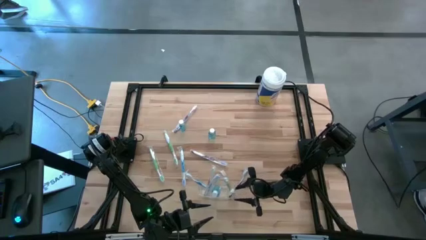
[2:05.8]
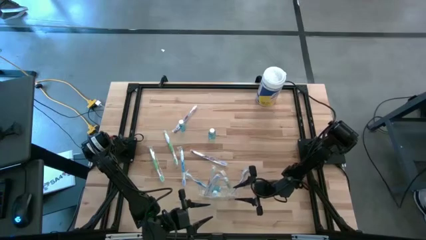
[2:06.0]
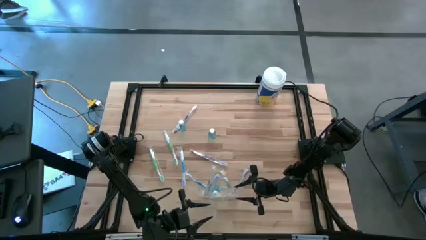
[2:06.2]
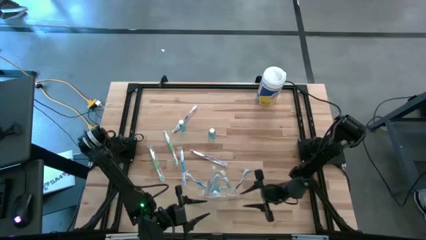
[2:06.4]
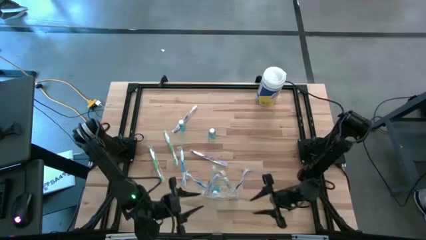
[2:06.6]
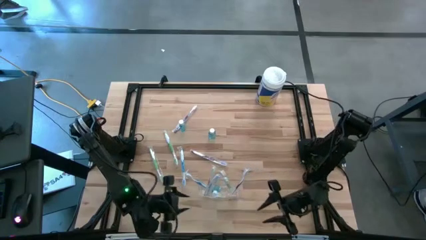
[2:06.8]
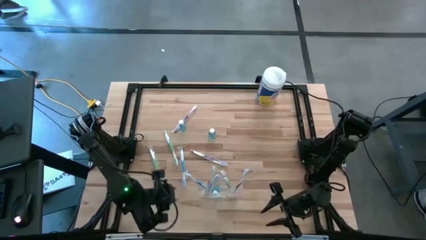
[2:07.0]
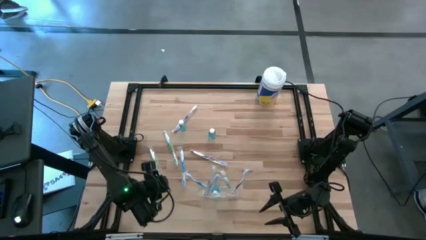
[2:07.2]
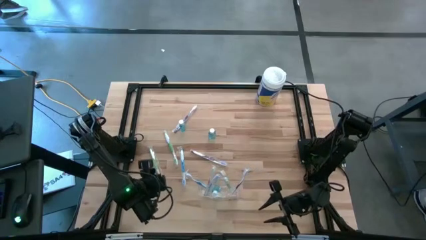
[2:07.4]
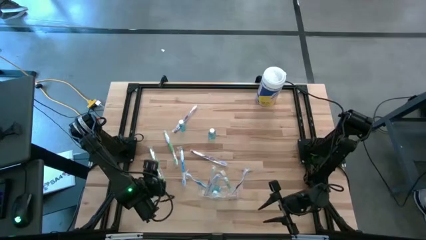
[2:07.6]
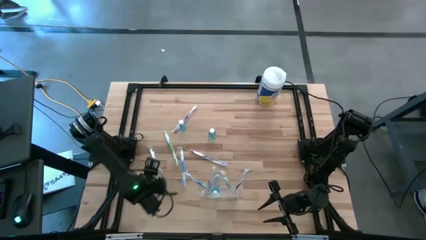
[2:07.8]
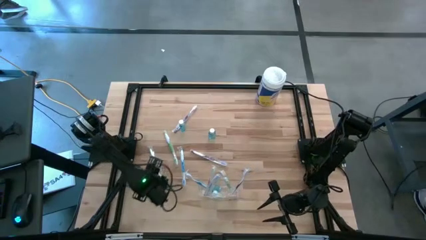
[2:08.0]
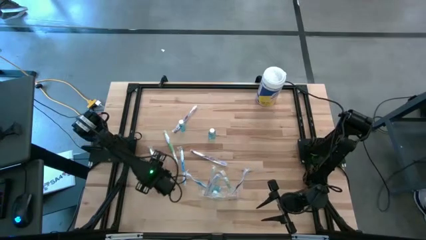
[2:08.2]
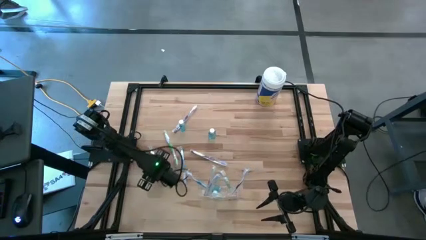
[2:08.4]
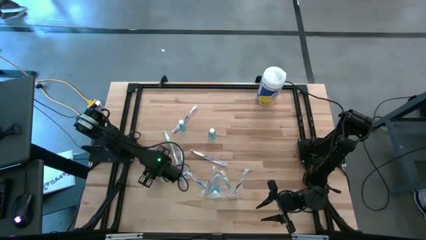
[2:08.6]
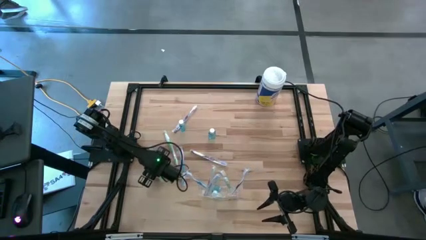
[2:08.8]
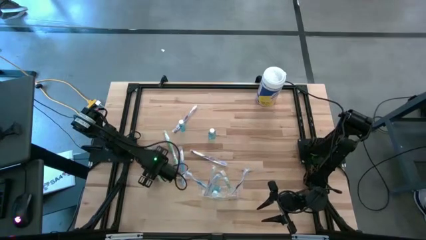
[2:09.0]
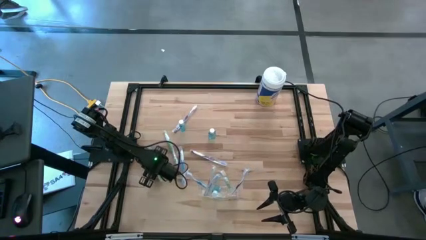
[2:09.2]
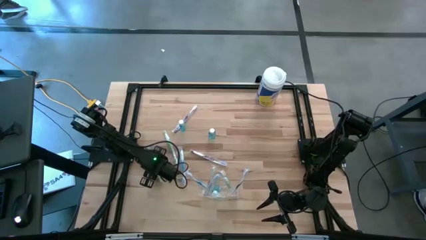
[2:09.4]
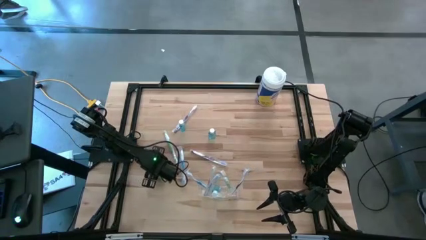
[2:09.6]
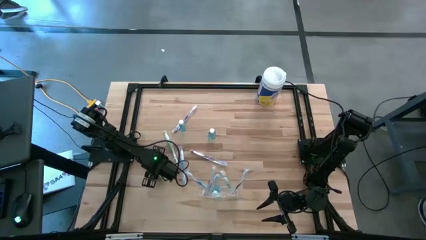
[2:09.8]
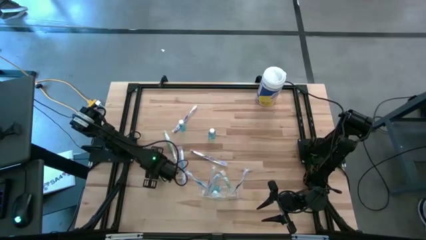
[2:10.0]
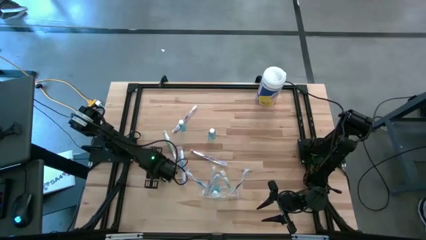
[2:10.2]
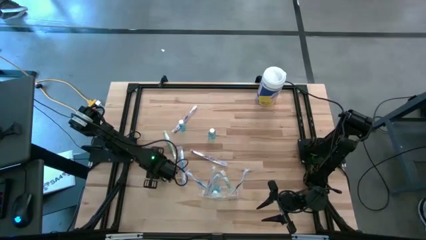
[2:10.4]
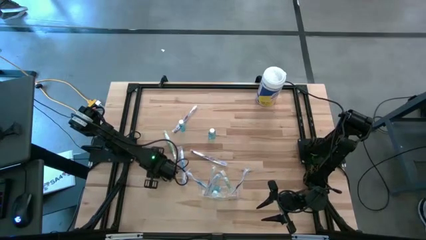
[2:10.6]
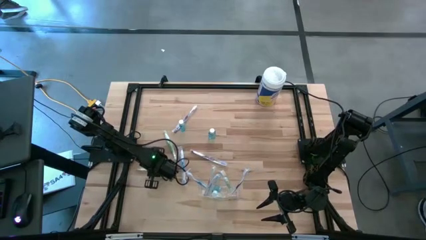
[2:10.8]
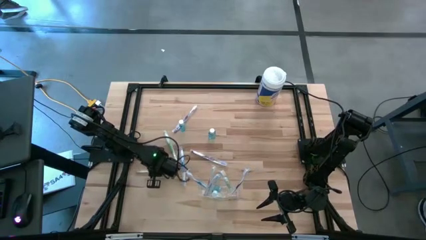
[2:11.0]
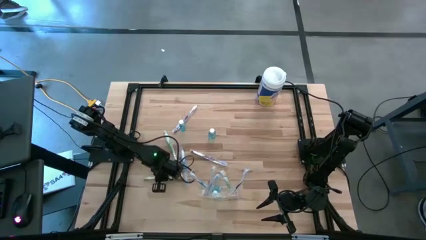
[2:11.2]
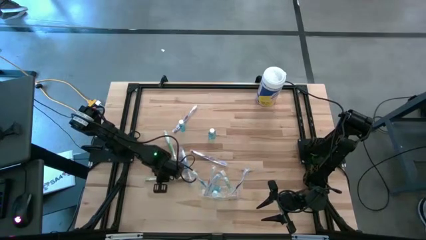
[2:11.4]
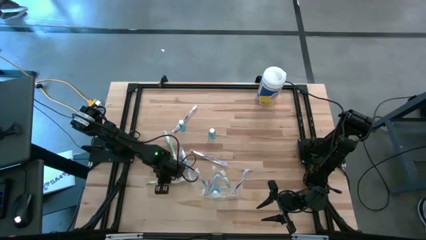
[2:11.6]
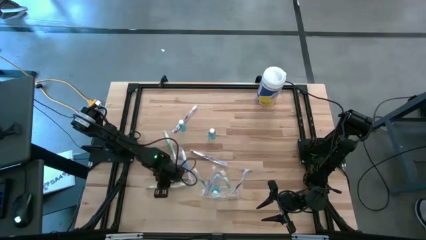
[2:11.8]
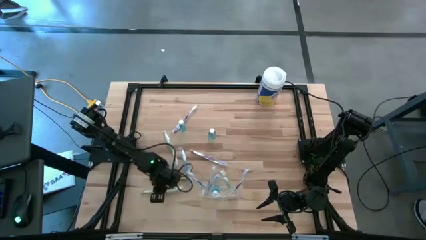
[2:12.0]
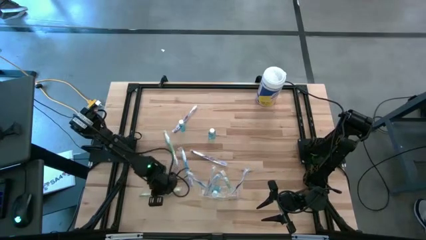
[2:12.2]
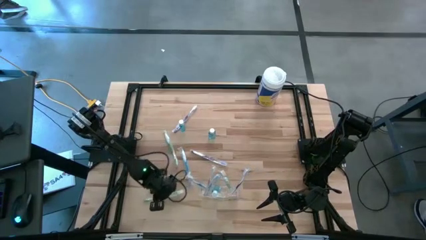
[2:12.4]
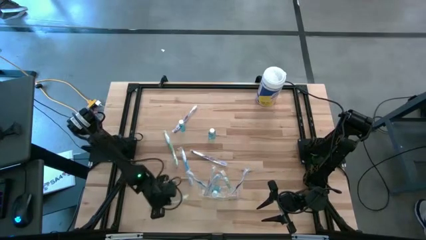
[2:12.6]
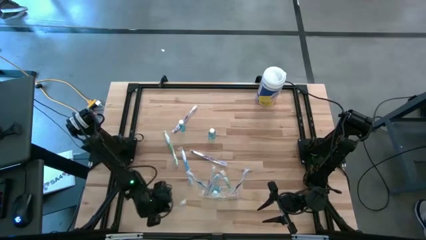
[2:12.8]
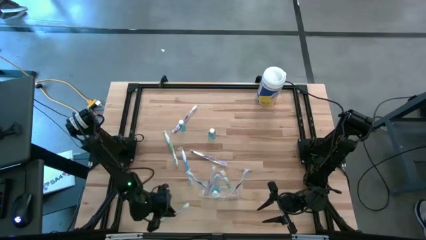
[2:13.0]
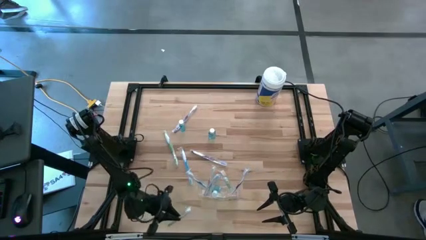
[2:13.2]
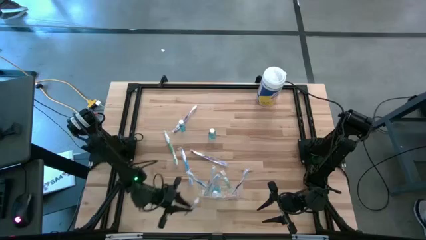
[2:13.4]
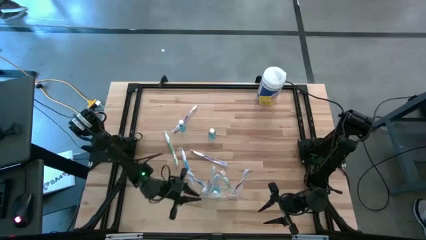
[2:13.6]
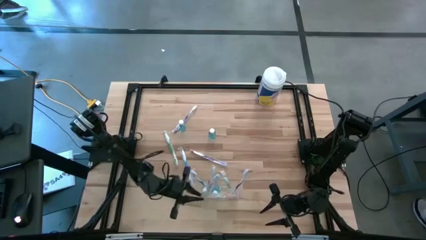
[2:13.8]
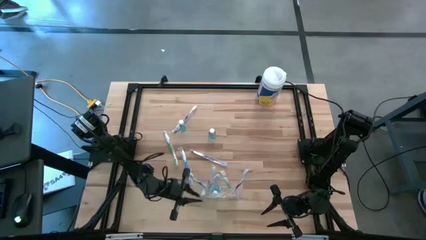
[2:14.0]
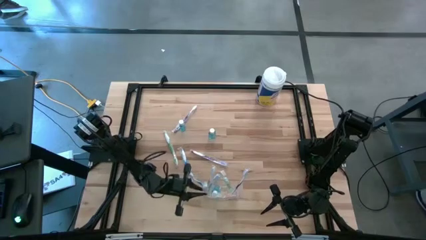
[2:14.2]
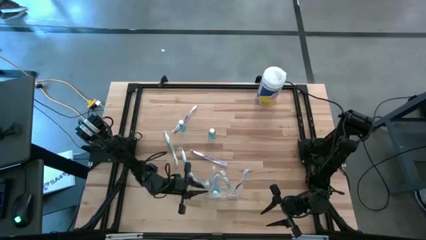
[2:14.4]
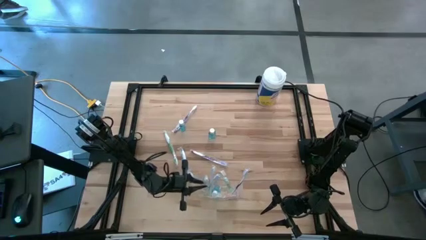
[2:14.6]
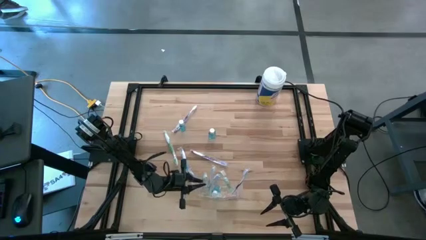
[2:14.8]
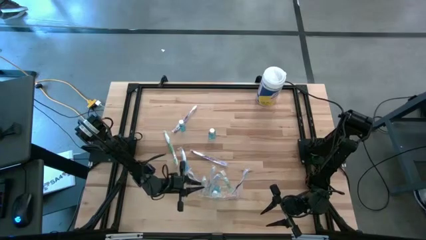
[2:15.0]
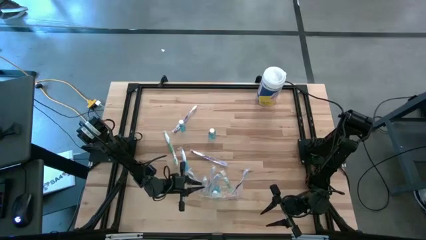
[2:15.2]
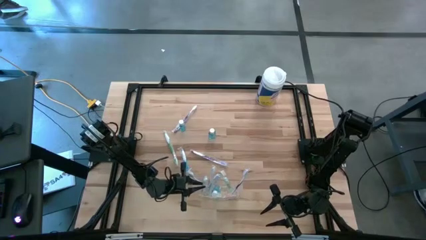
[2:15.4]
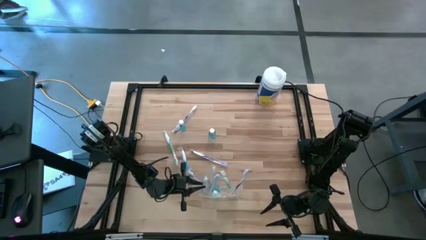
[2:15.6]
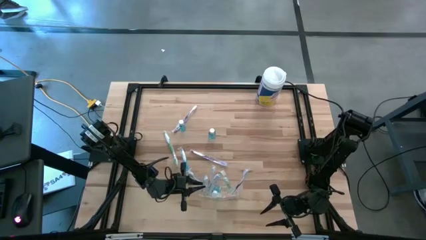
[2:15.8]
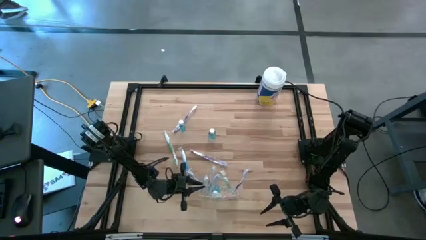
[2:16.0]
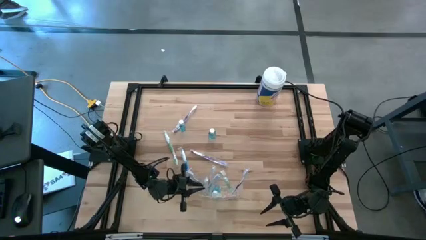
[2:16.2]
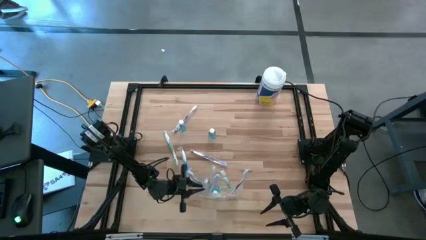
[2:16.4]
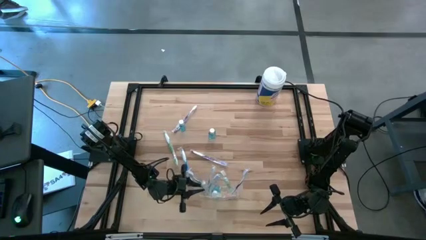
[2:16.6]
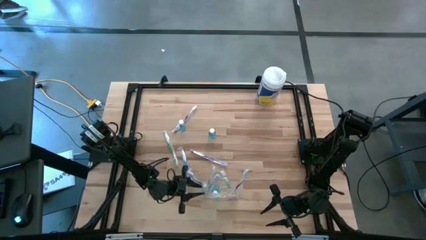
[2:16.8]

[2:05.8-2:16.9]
Task: Pick & Place toothbrushing station
Put the green toothbrush into the transparent organizer

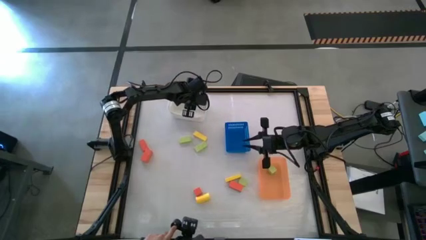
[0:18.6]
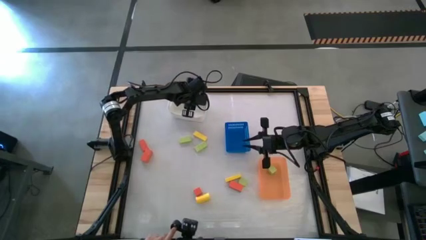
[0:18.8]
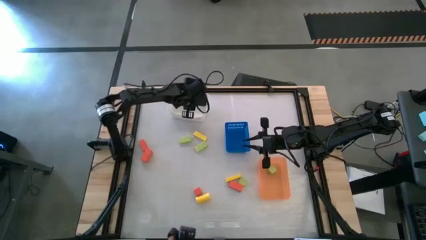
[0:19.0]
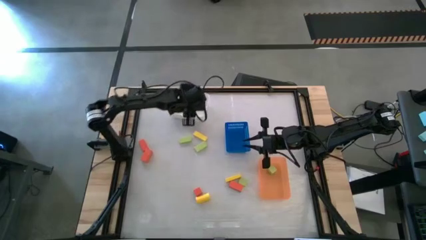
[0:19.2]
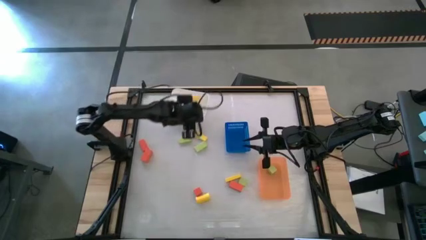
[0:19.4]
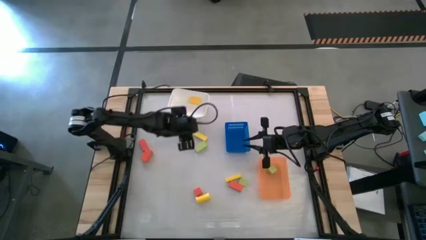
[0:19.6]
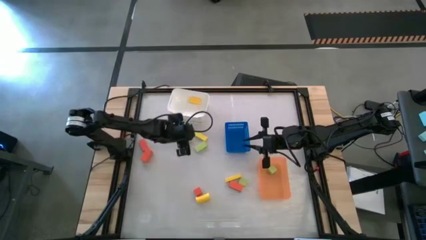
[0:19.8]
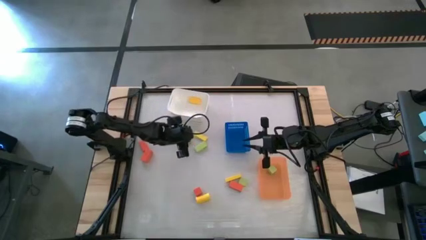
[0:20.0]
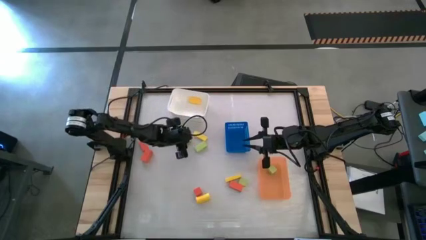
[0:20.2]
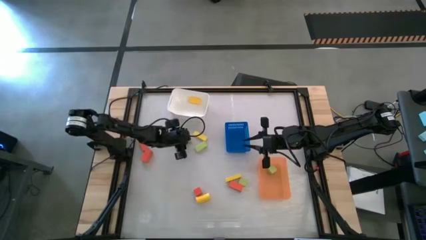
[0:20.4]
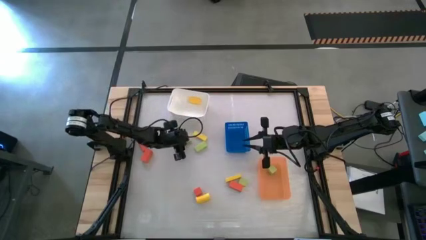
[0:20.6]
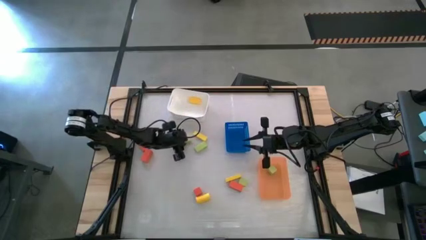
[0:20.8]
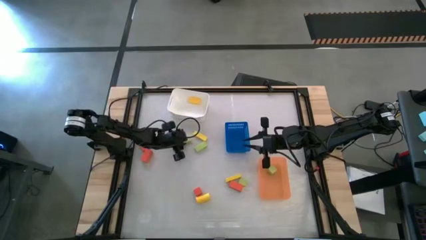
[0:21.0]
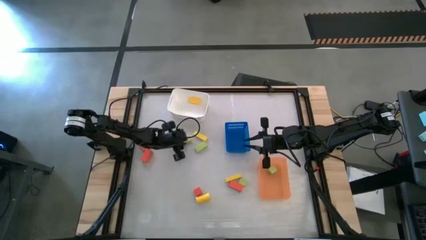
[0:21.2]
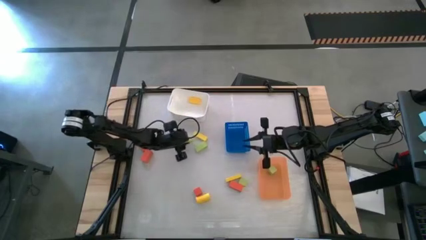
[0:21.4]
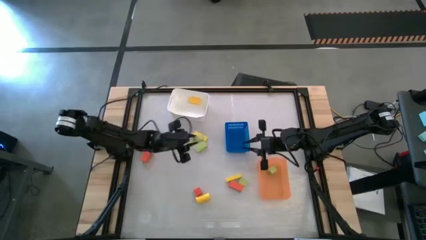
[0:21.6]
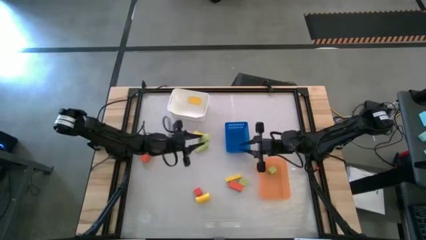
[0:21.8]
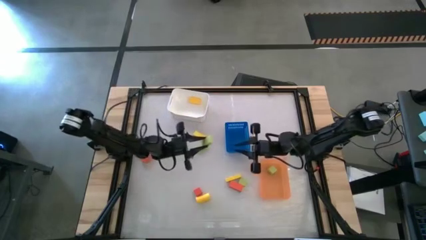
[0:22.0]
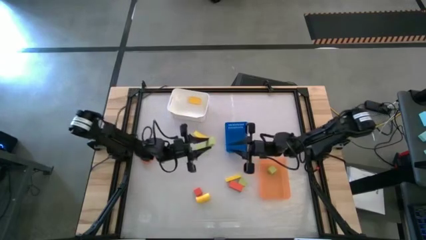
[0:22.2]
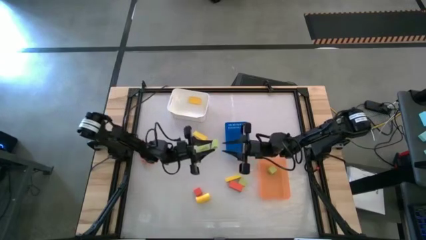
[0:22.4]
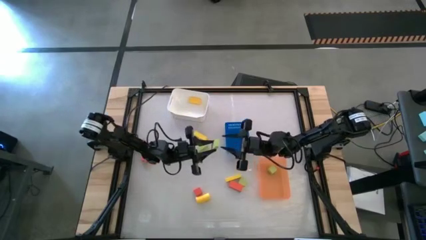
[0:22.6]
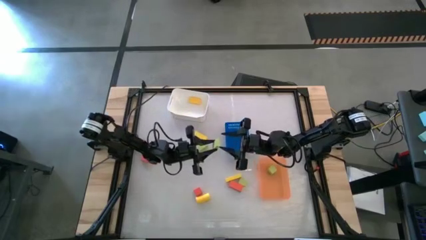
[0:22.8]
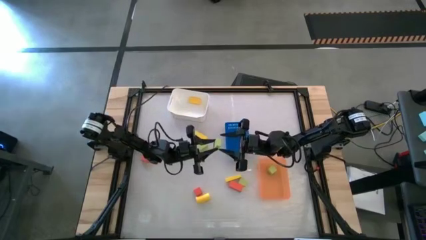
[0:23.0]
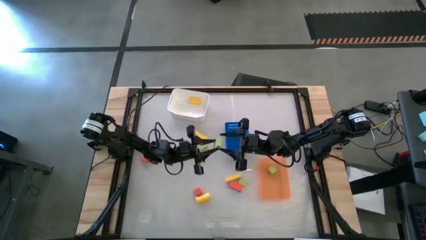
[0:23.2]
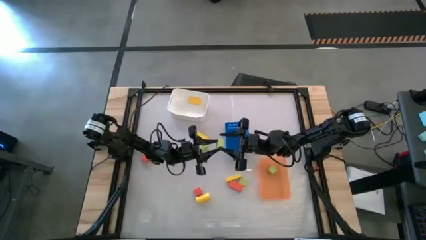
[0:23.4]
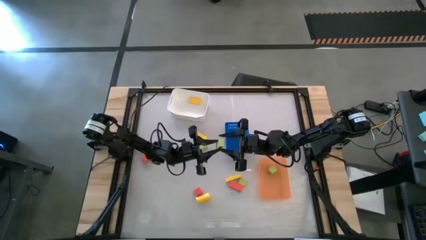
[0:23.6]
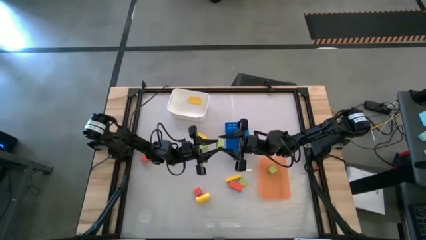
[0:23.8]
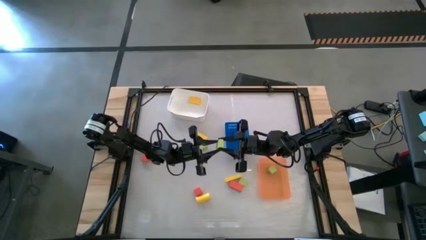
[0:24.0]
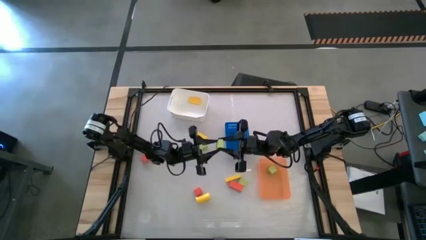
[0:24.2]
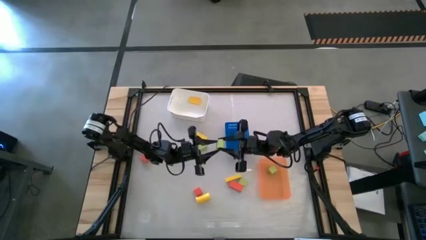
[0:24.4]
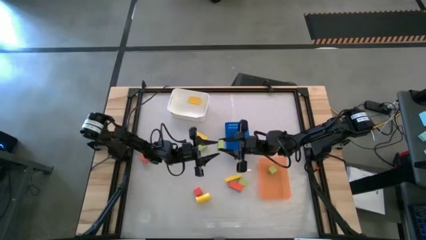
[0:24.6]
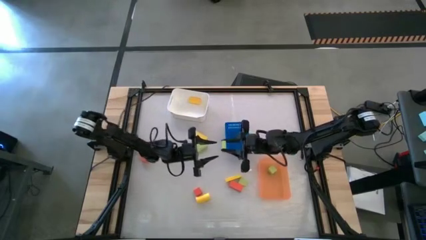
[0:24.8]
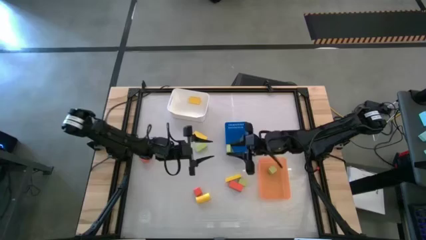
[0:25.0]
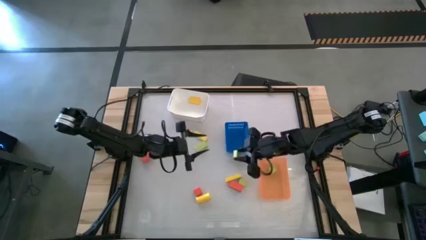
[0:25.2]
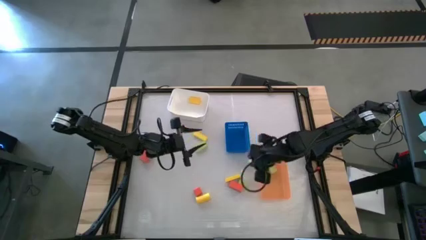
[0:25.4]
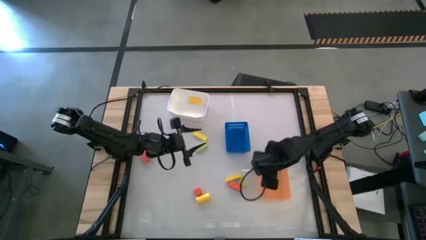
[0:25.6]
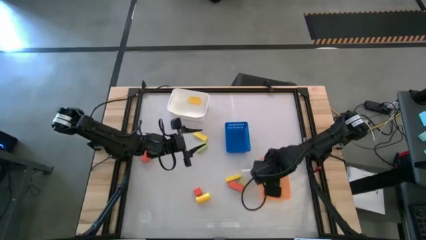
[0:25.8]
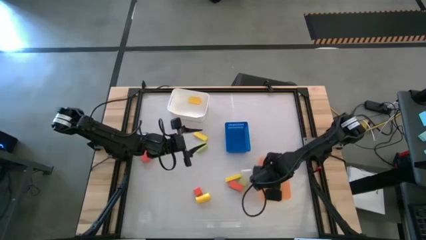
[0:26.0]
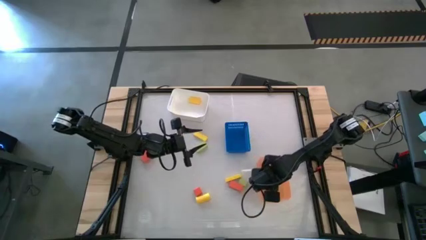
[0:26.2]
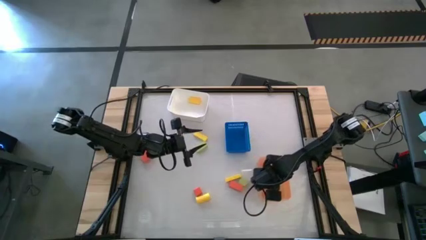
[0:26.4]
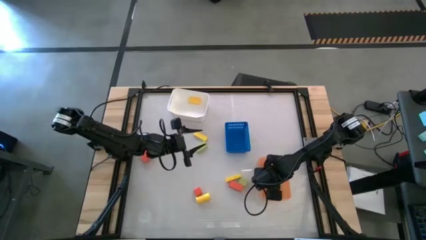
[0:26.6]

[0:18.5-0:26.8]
Task: Sort & place blocks by color
Put the green block into the orange bin
